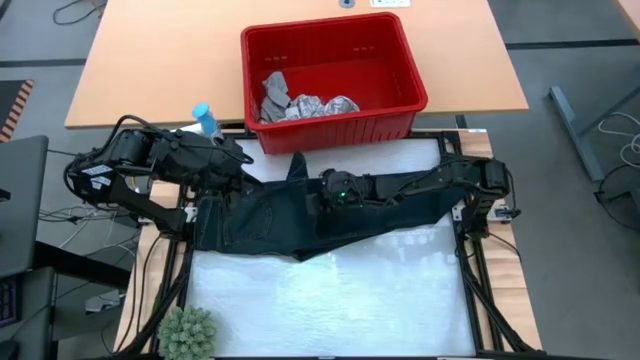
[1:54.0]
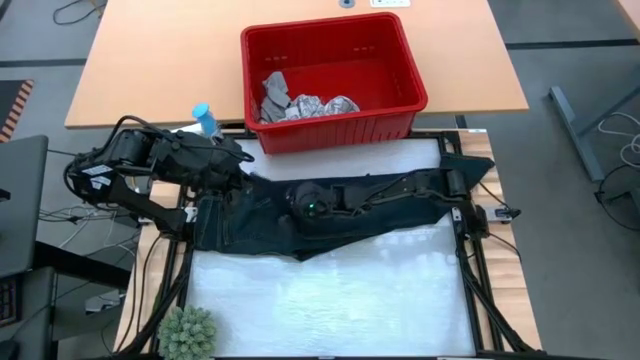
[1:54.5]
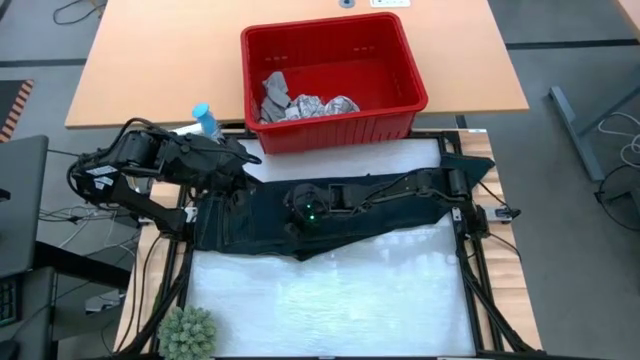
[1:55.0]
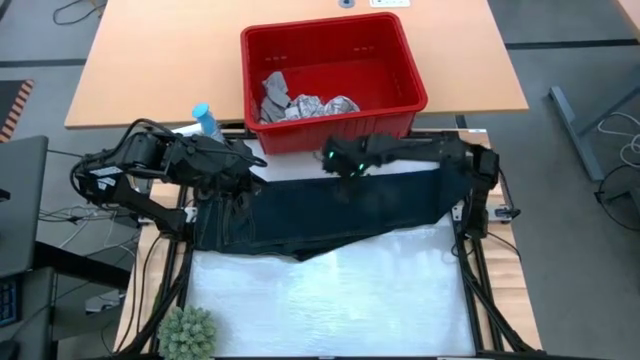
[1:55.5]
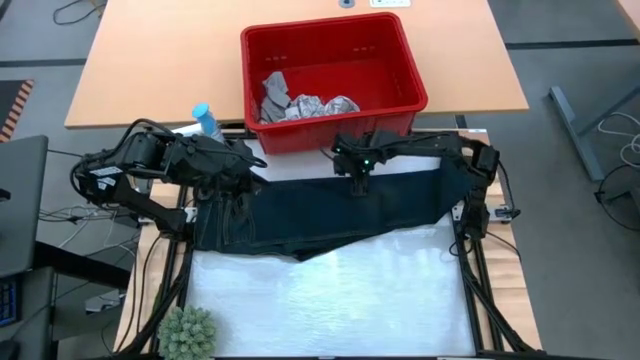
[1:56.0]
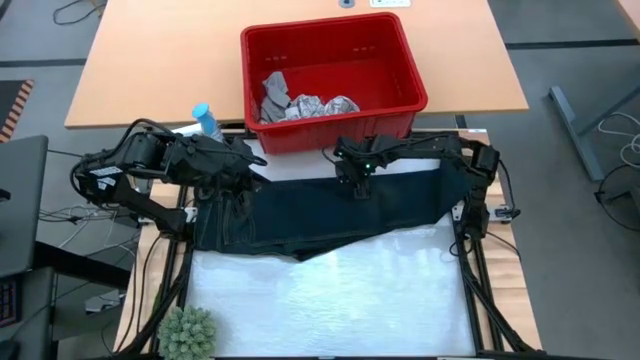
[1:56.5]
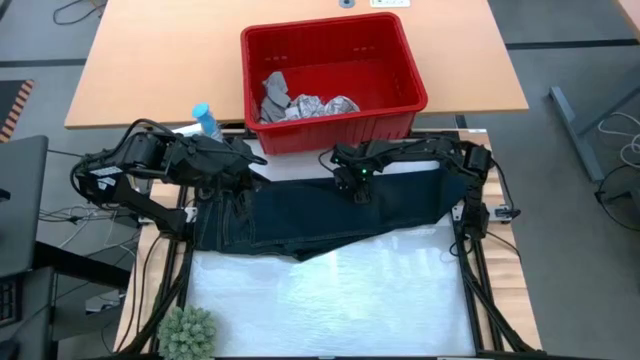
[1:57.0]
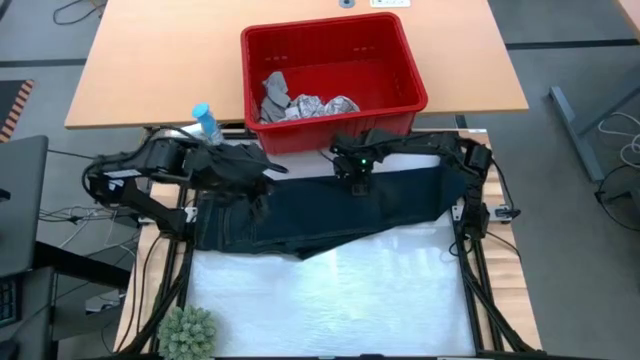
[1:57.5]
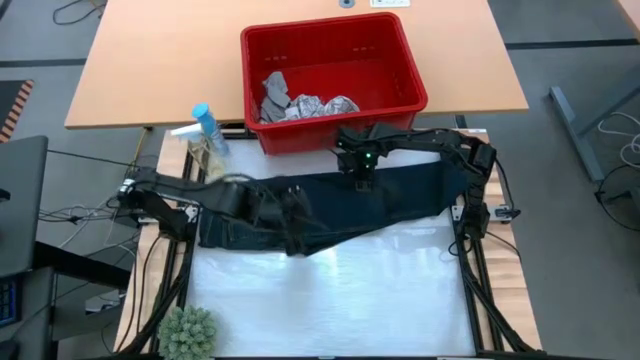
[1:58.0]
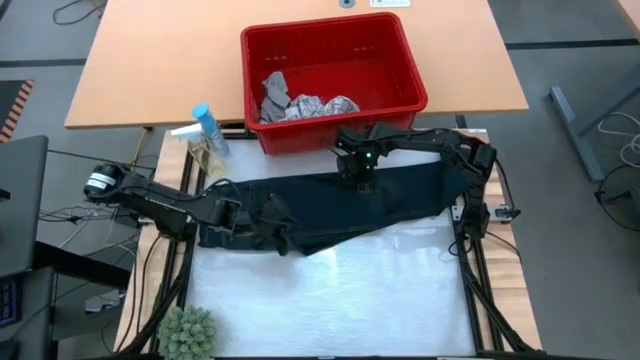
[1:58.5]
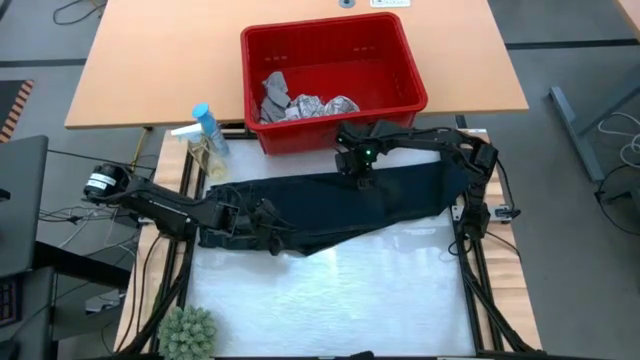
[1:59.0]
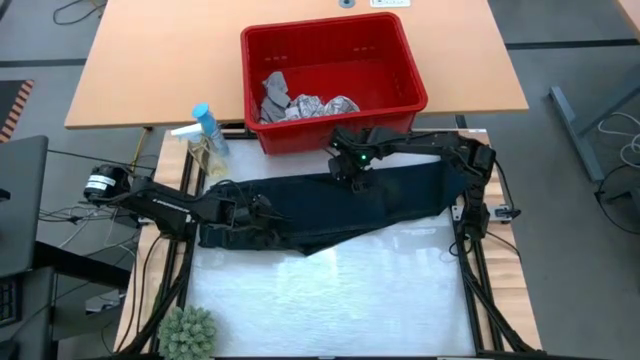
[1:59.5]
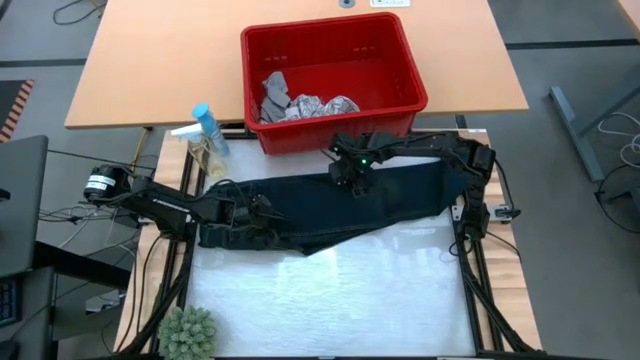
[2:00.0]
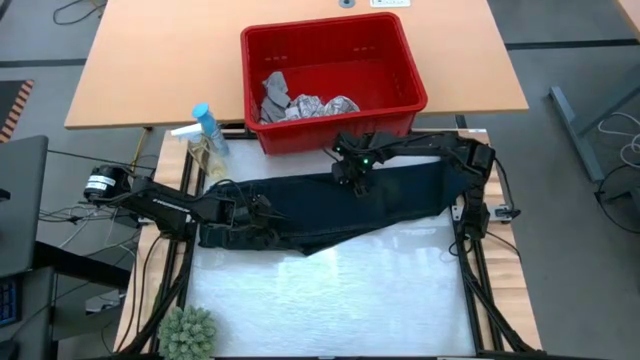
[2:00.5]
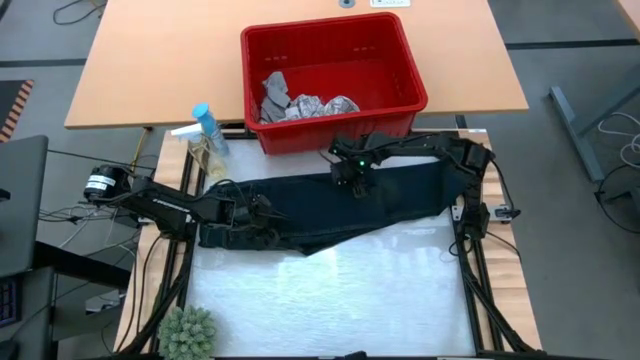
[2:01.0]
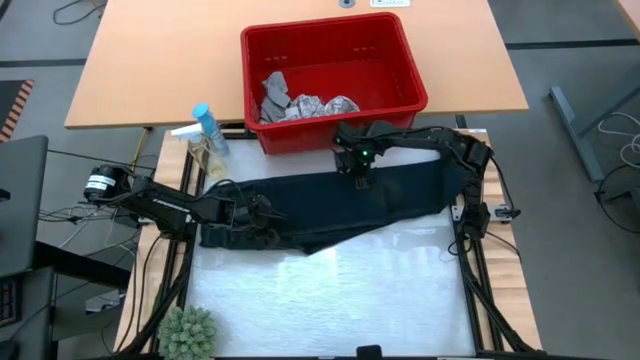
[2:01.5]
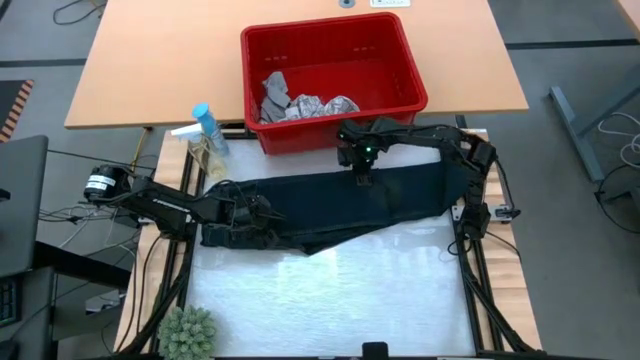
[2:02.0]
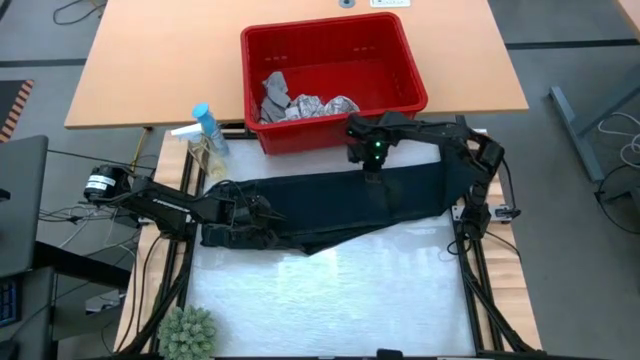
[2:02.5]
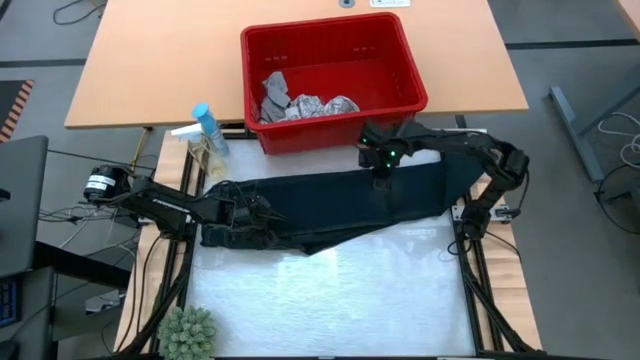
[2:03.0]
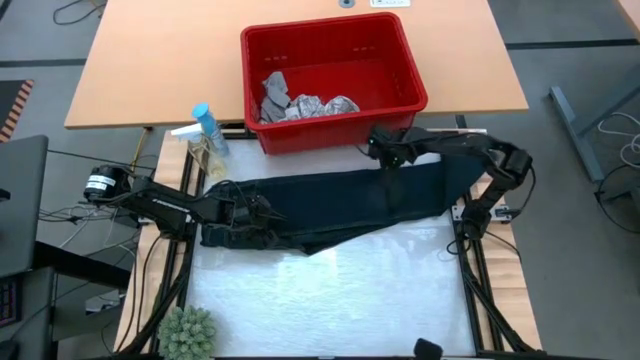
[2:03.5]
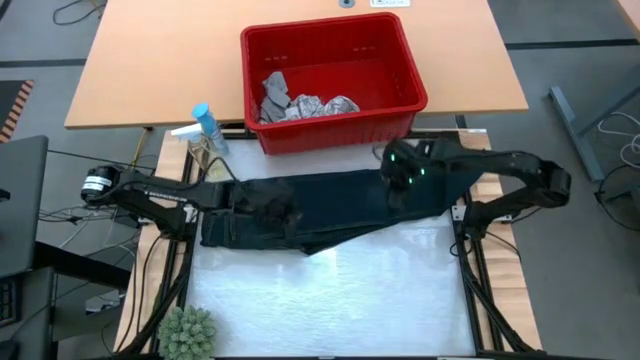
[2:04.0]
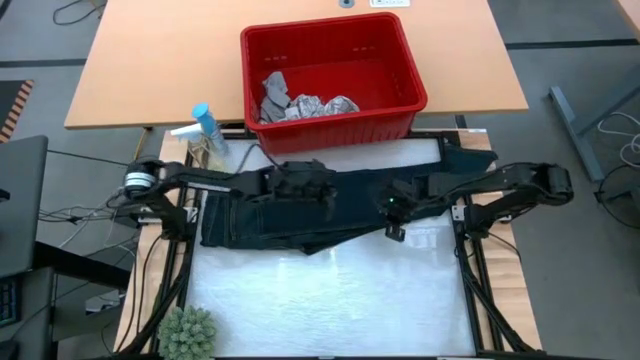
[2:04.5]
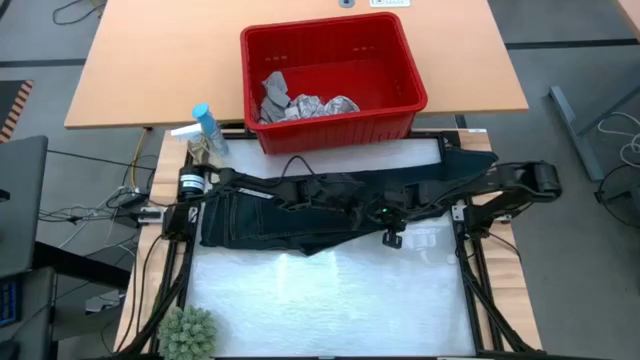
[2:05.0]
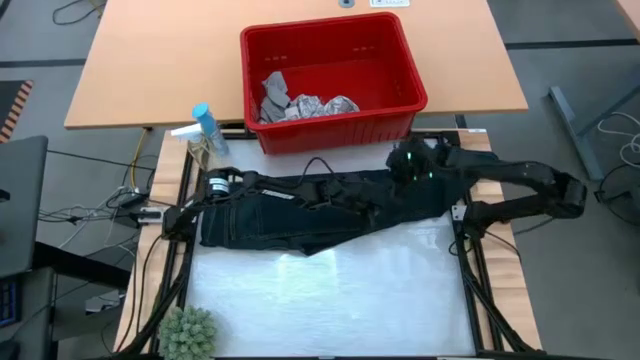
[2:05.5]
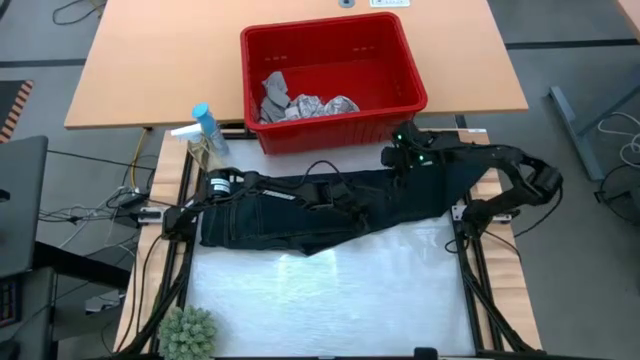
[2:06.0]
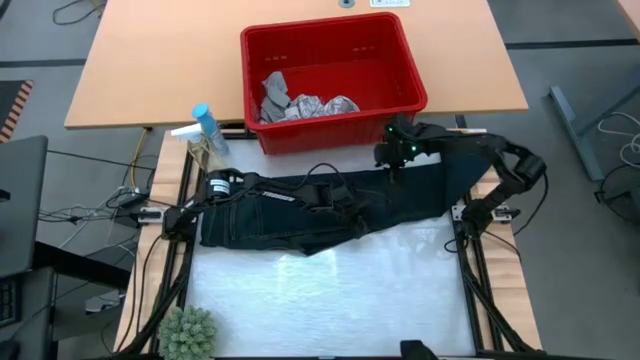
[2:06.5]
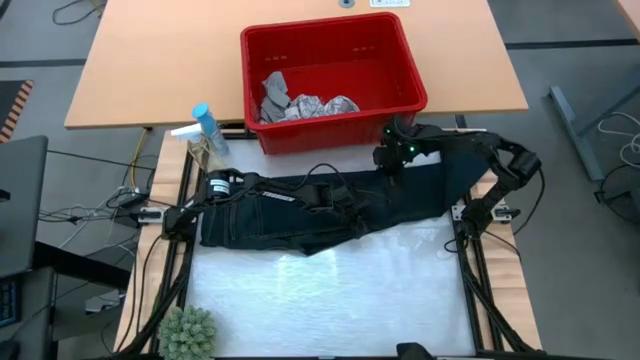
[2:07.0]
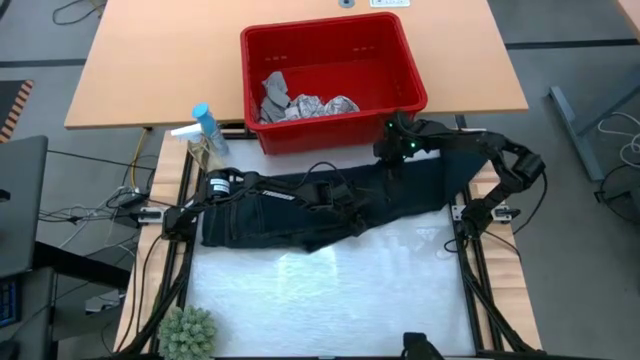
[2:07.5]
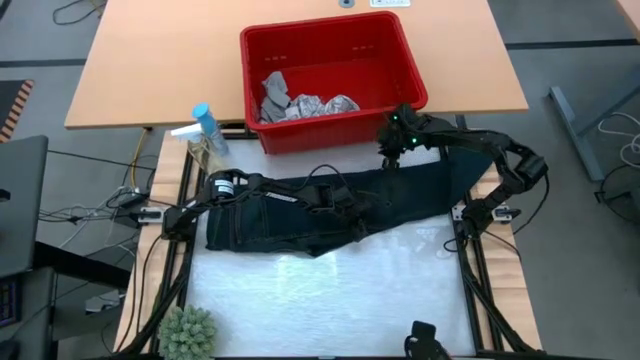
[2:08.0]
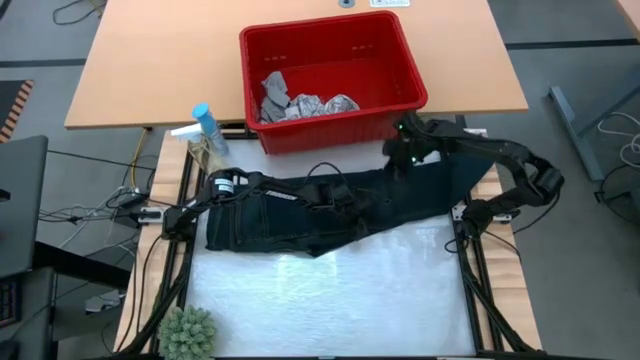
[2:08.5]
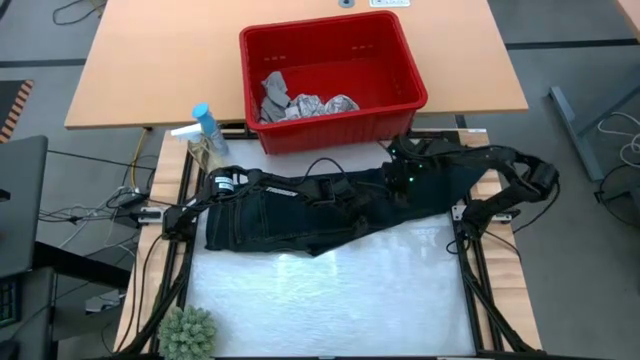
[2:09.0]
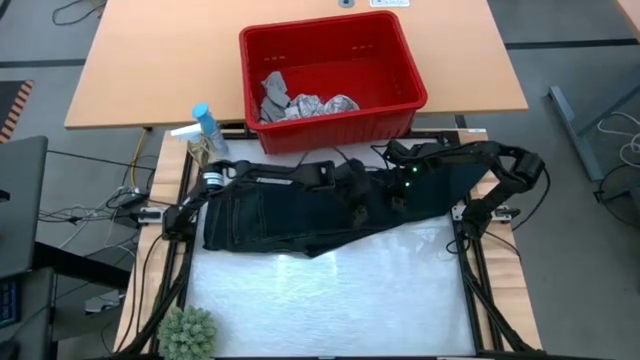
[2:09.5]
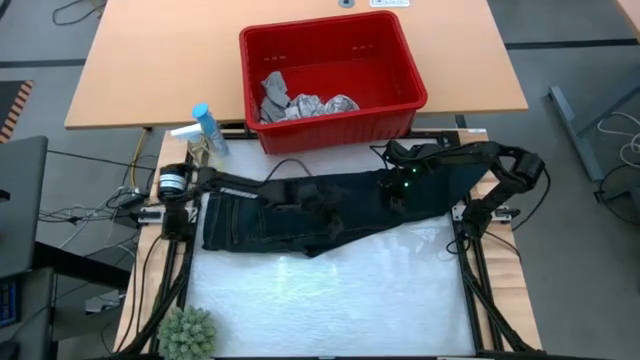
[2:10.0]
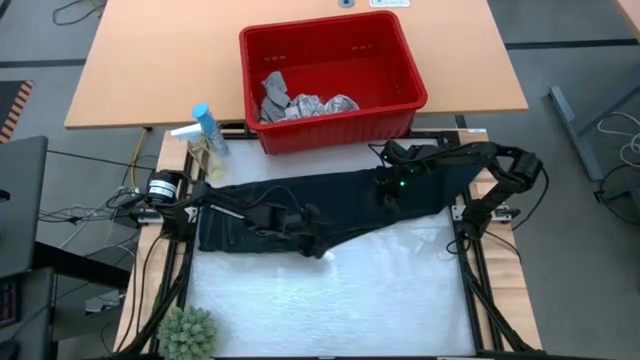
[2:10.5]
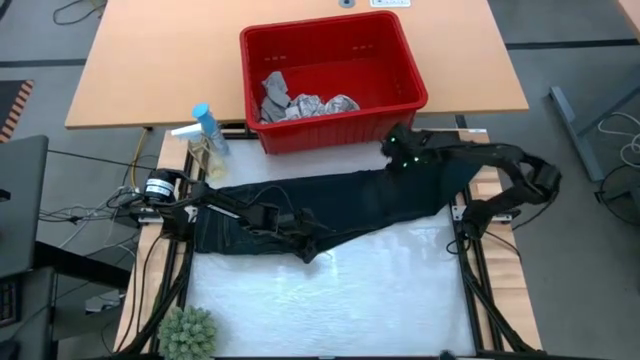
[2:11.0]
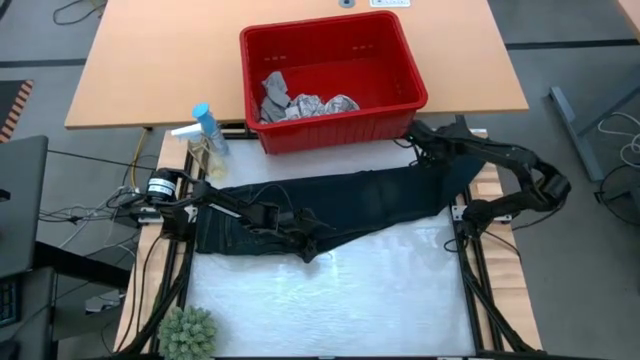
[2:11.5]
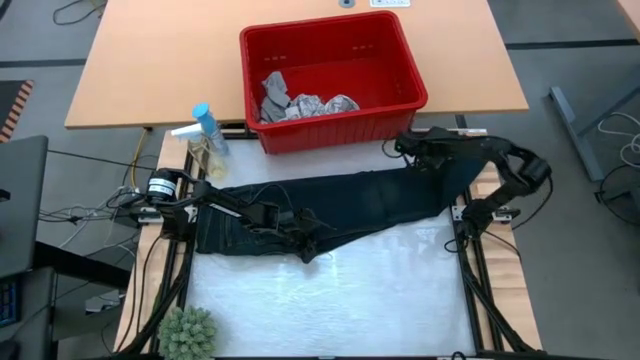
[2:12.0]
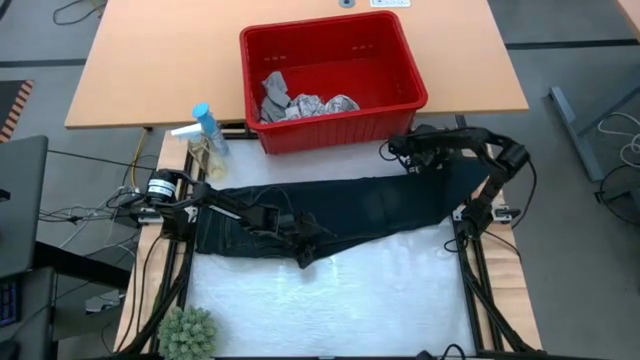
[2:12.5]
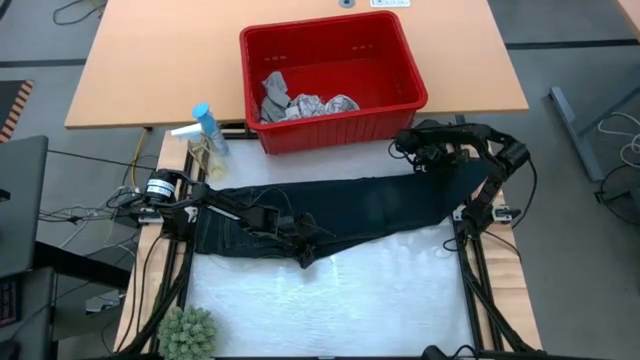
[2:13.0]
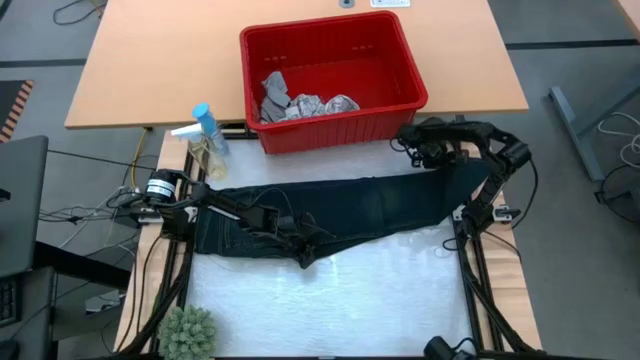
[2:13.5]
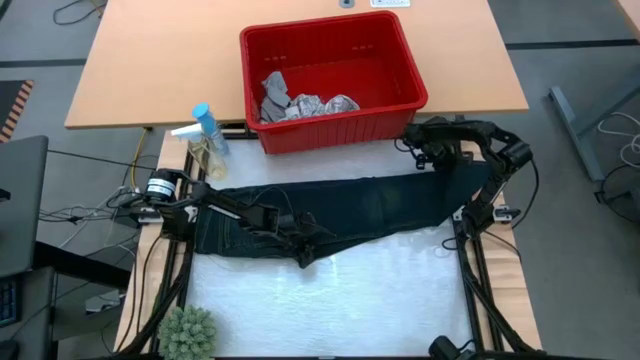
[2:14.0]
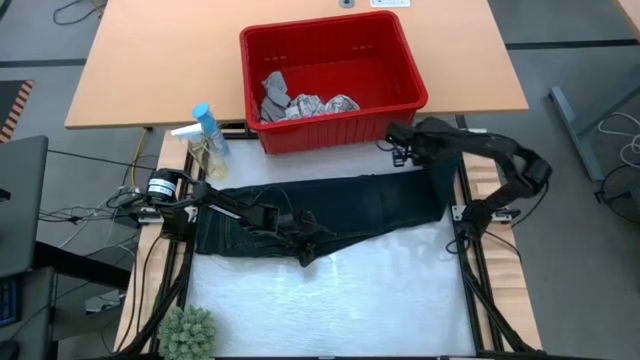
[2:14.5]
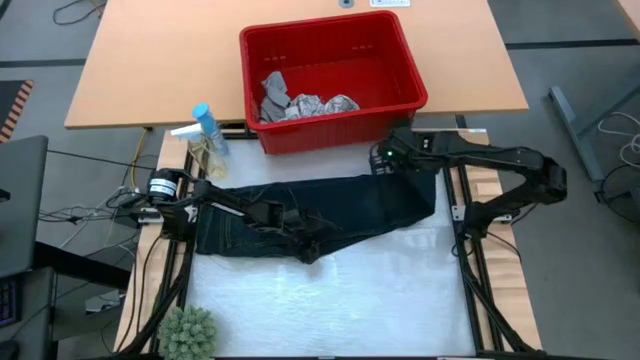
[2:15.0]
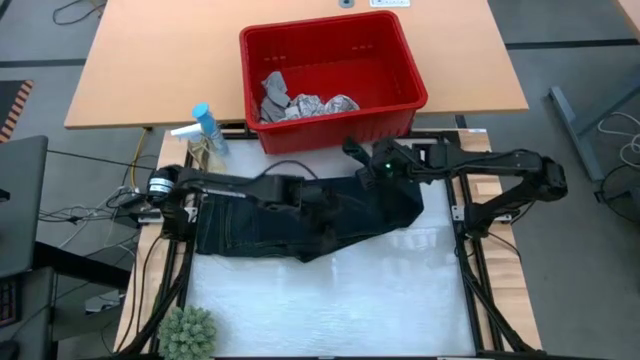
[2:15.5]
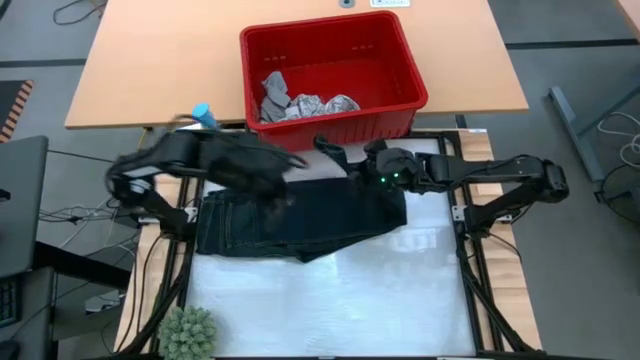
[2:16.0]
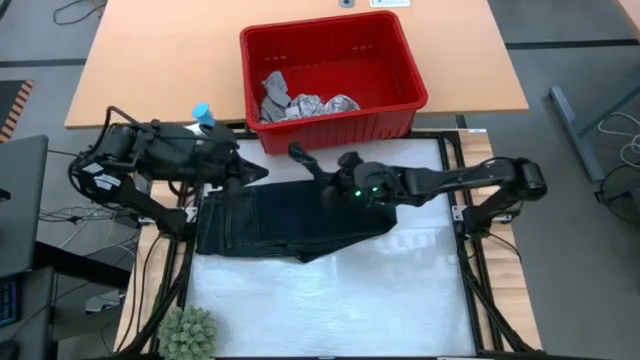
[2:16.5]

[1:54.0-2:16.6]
Task: Fold Laundry from Bin
Fold the blue jeans
